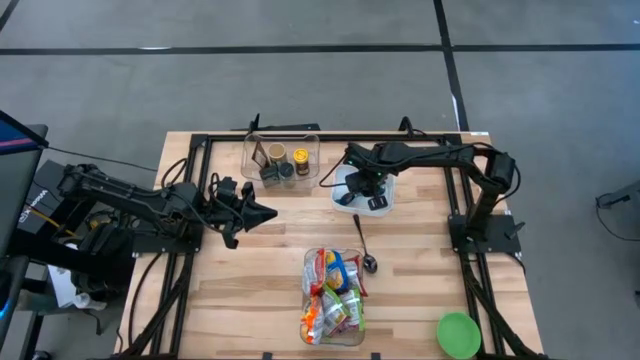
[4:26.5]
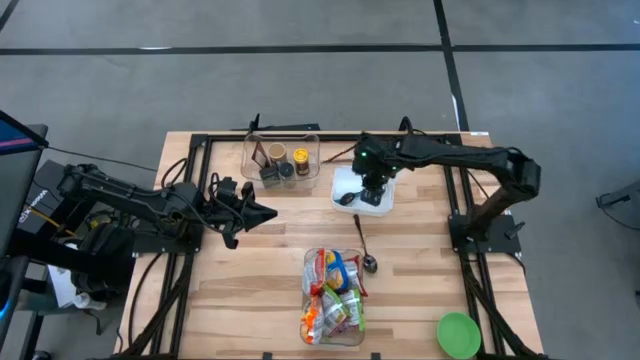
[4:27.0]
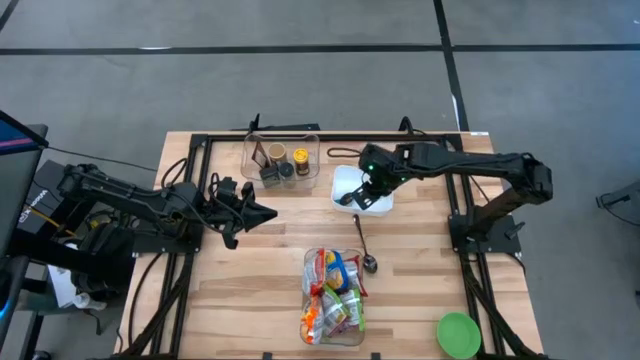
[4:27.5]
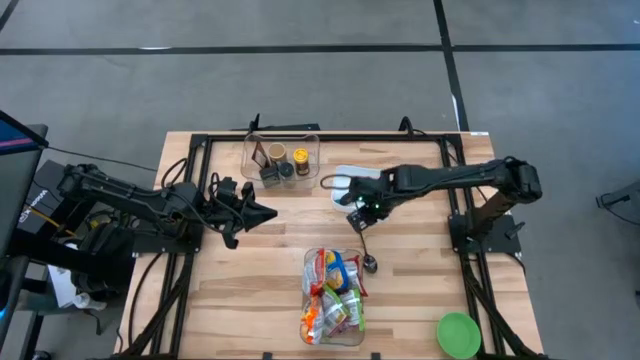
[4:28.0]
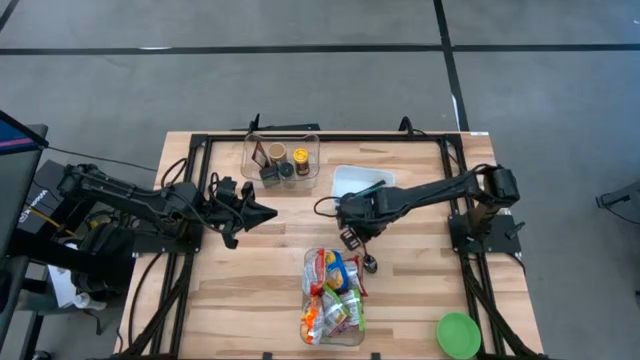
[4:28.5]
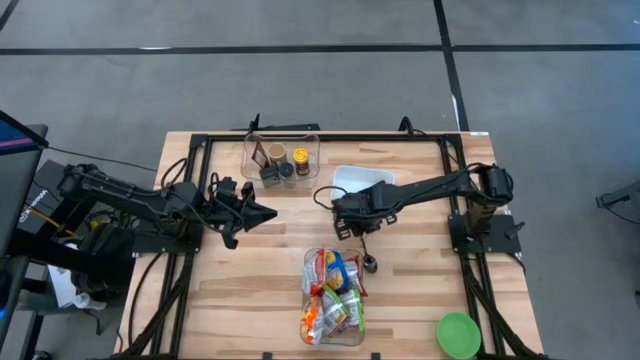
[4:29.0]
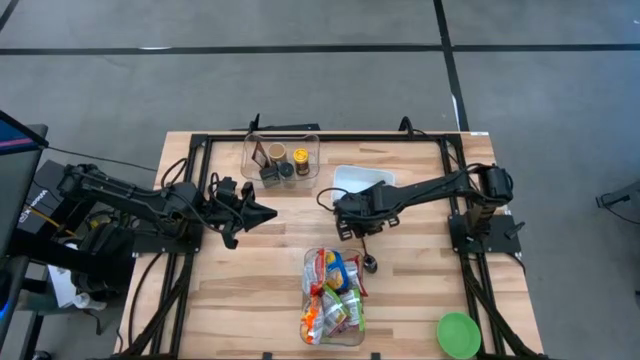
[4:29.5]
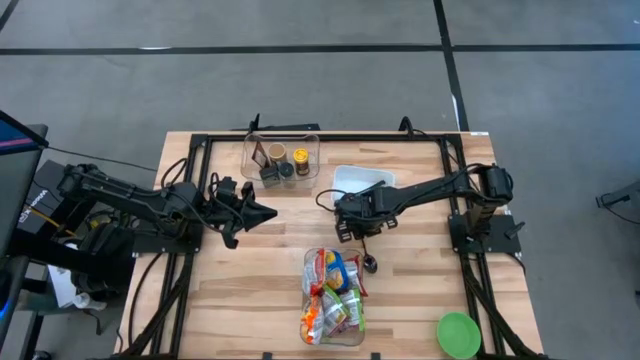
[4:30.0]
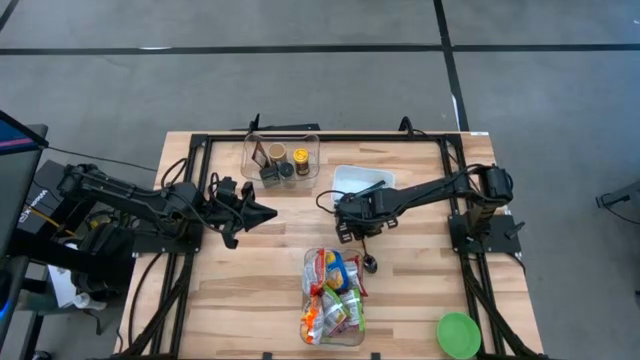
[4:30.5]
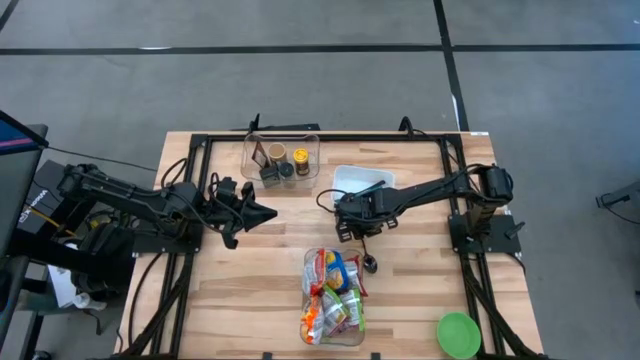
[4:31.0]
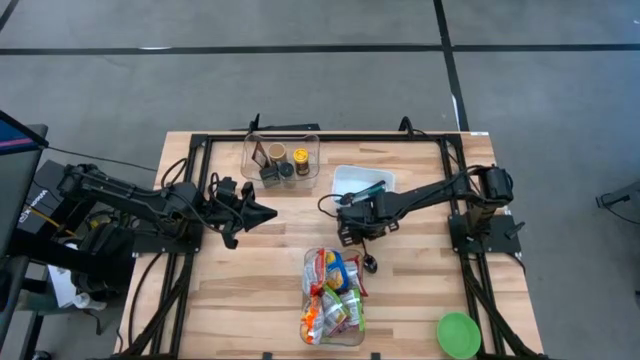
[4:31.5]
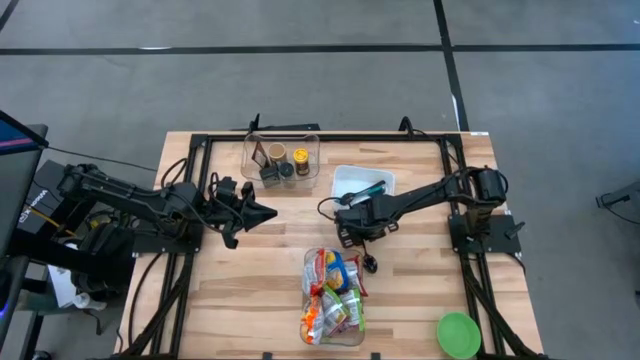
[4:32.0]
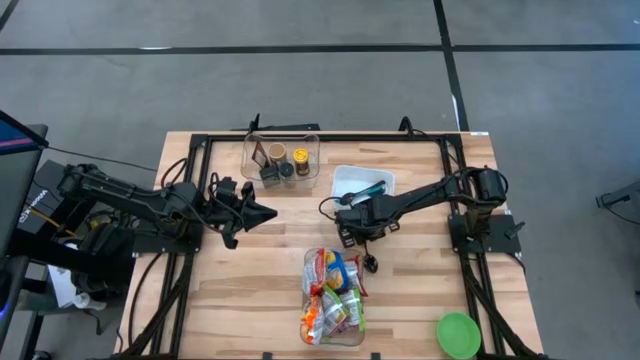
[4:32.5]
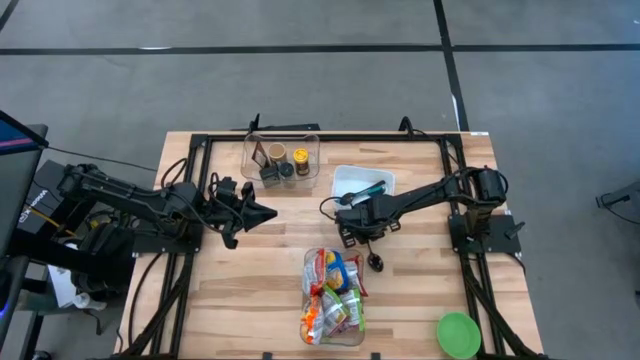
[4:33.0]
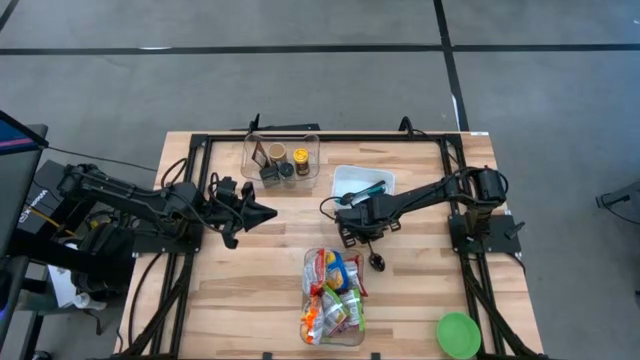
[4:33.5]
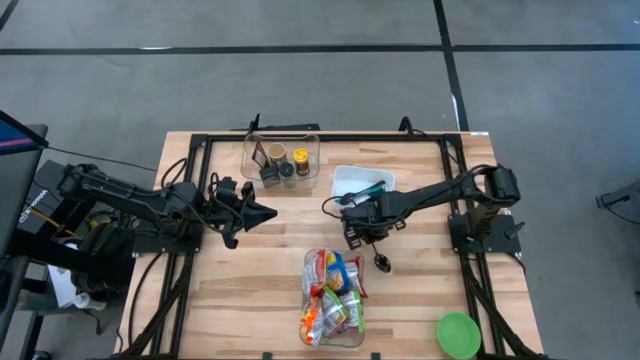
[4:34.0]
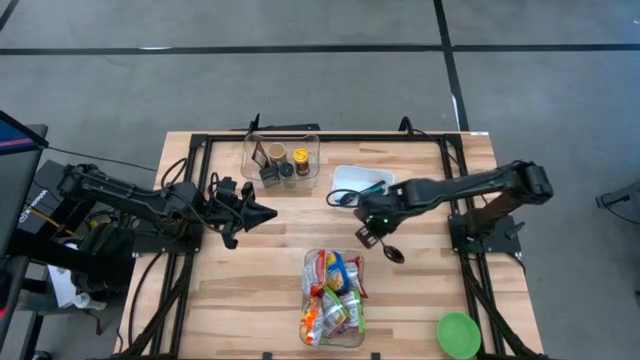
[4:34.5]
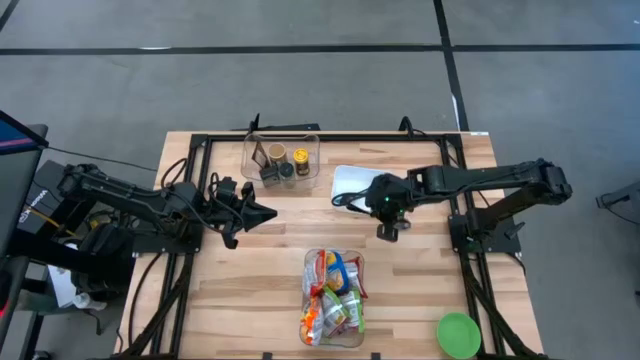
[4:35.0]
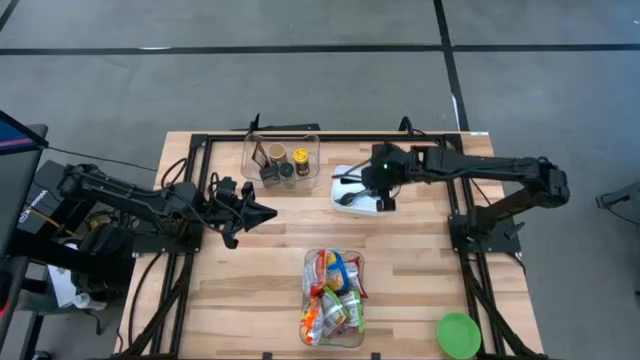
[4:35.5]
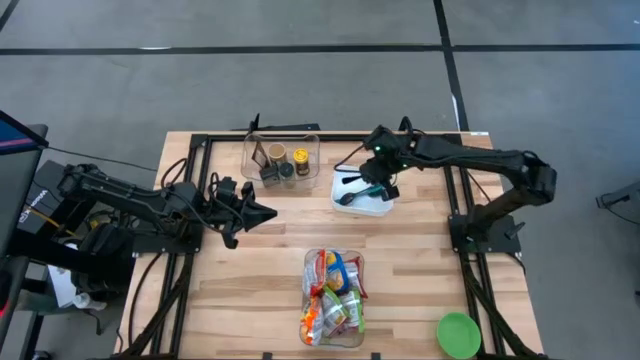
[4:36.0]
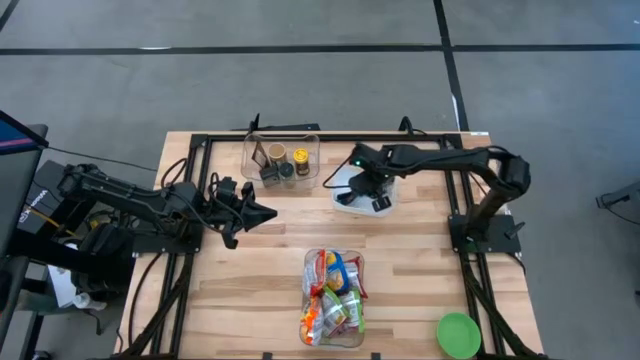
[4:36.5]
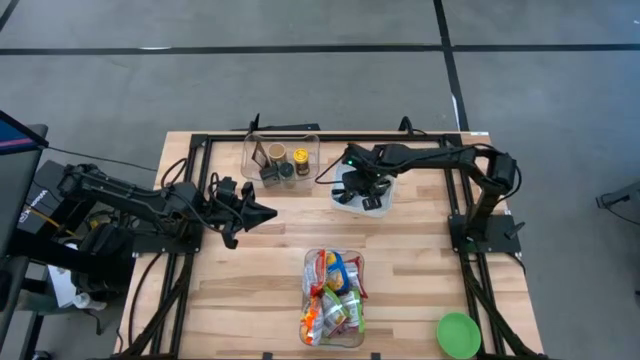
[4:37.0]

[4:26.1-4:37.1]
Task: Pick & Place Food Item
Put the black spoon into the white bin

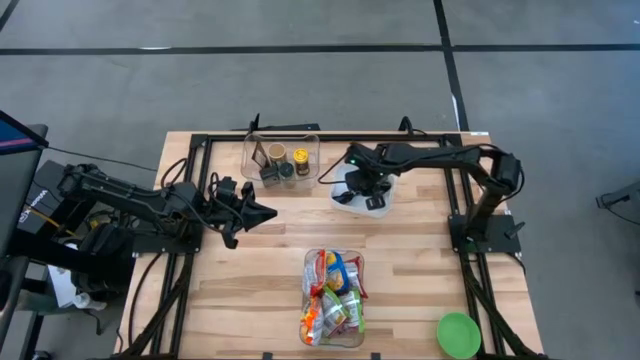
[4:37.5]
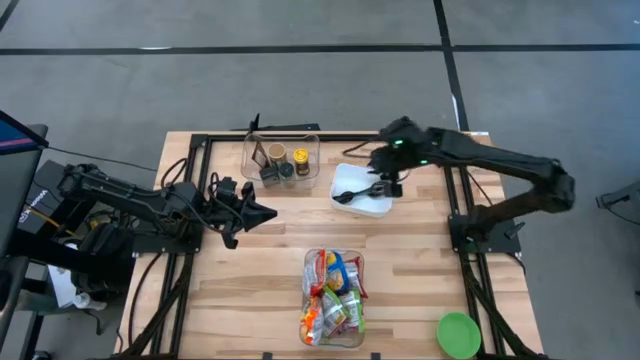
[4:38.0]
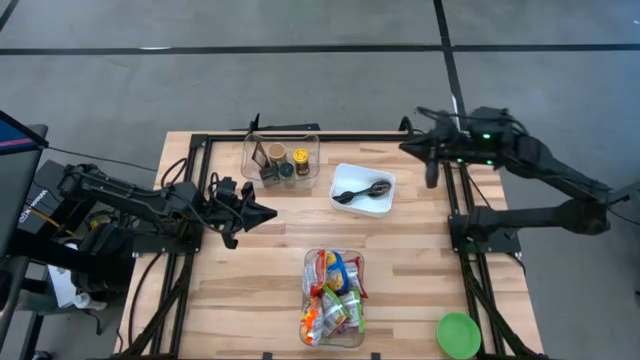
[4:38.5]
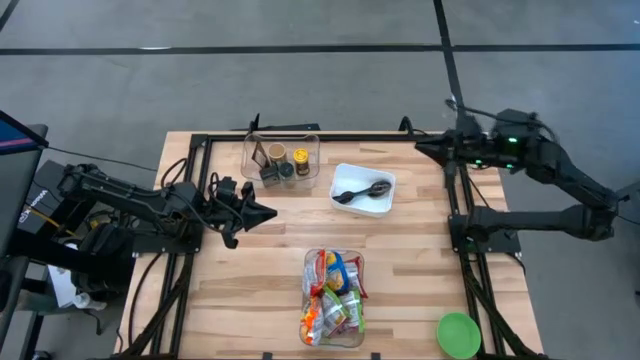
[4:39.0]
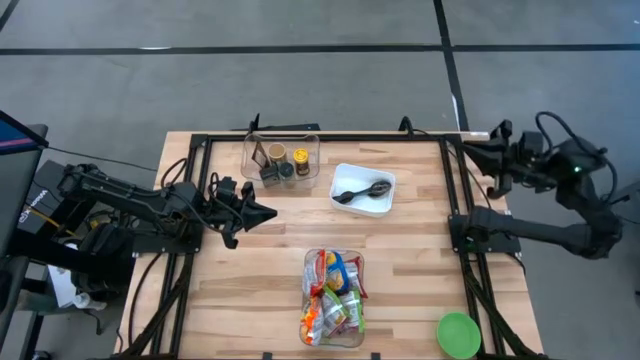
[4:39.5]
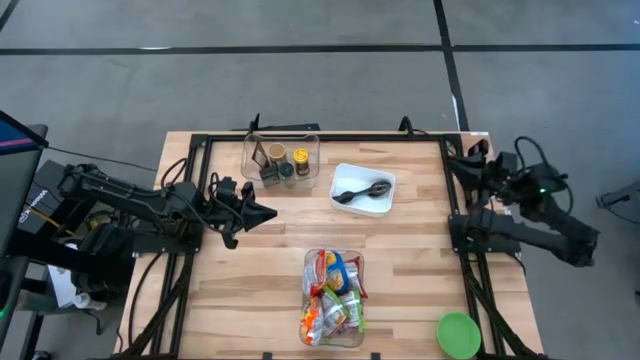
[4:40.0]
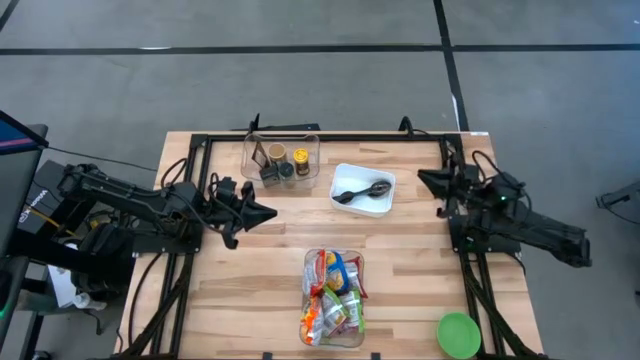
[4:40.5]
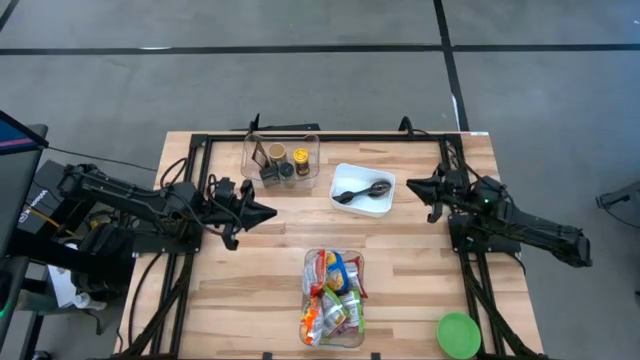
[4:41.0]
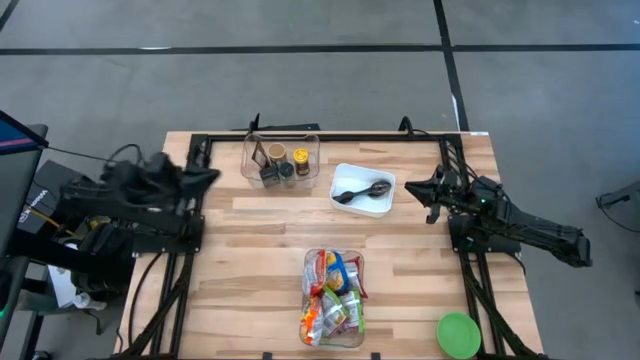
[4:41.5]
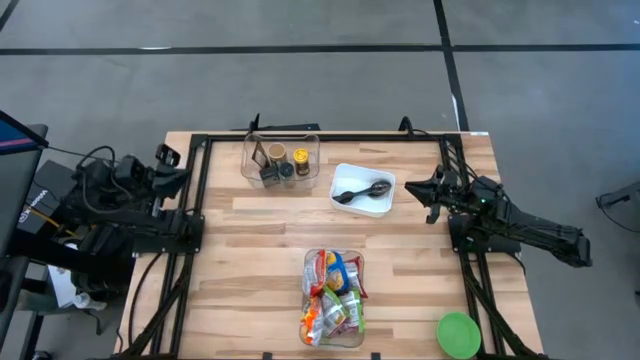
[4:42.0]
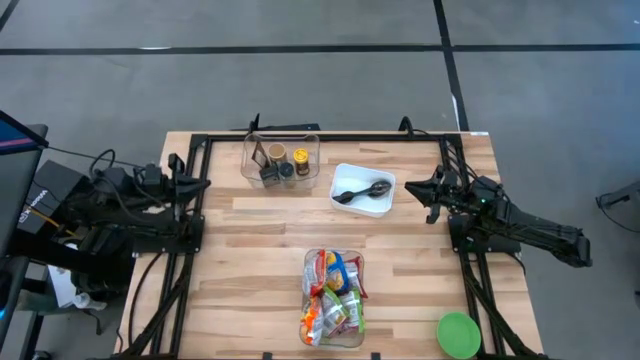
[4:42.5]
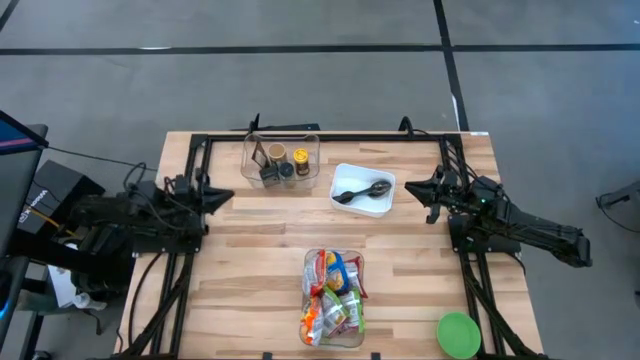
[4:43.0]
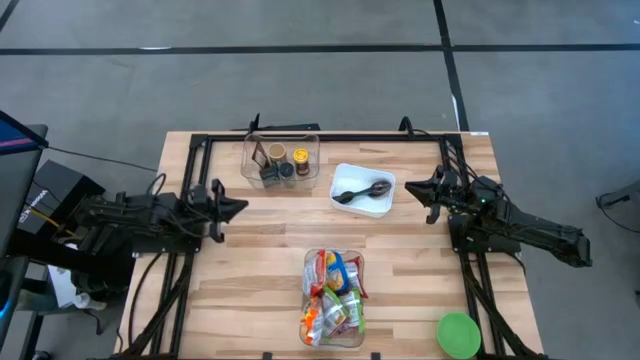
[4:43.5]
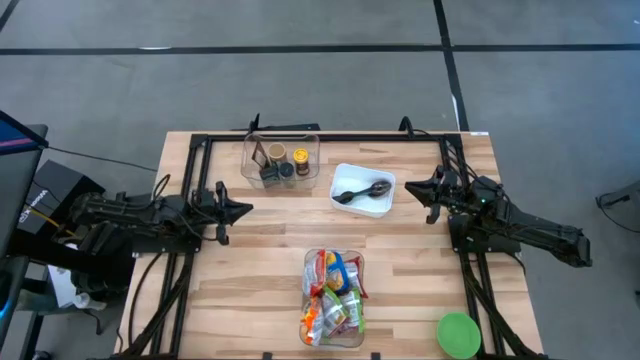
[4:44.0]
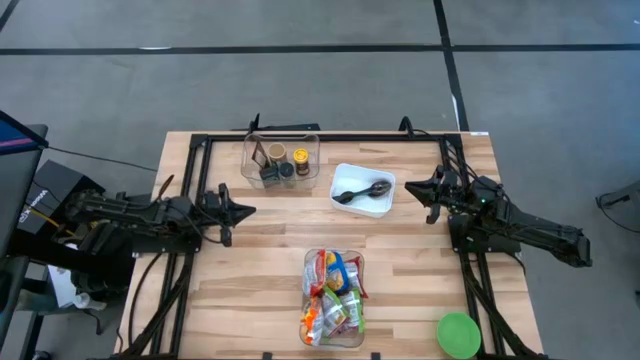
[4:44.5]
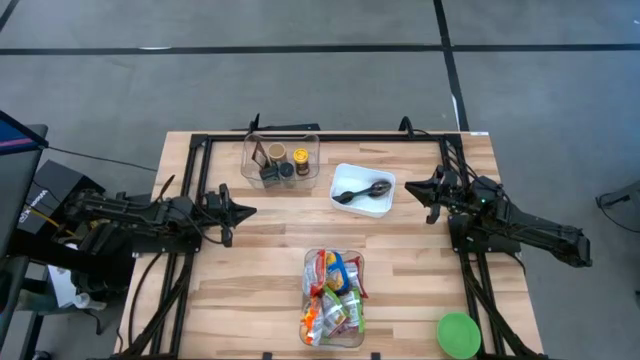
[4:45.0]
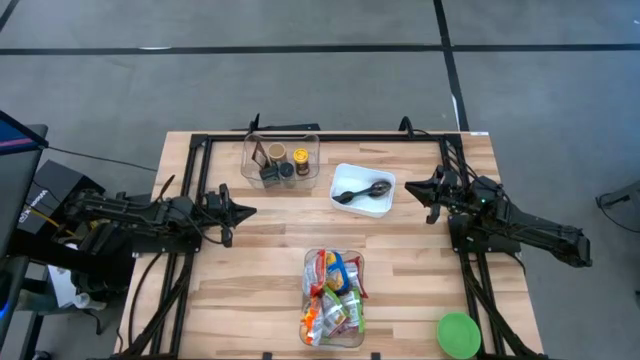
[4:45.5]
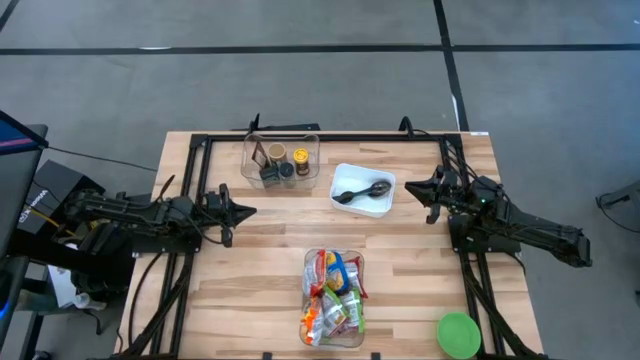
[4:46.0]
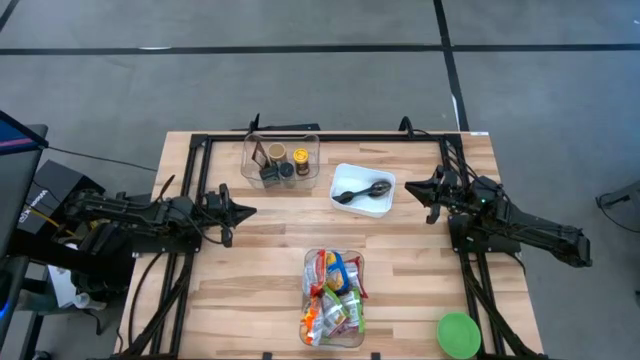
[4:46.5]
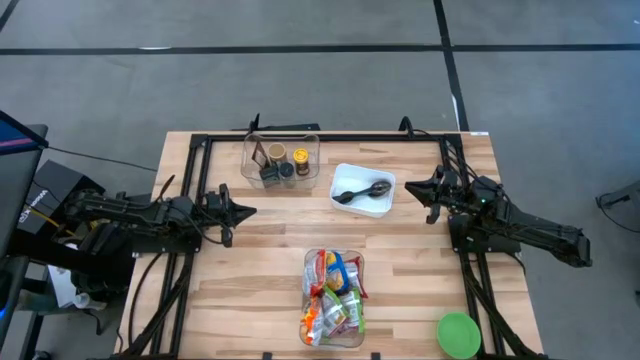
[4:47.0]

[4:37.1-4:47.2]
Return to Home Position

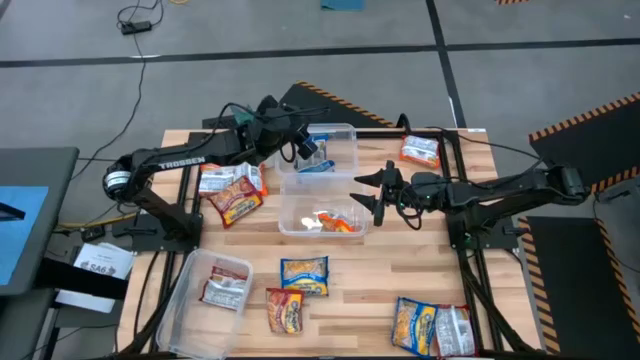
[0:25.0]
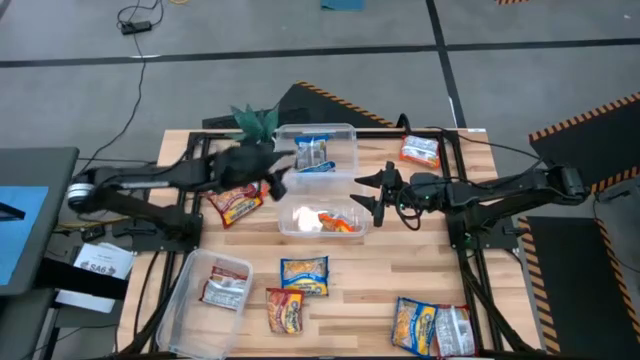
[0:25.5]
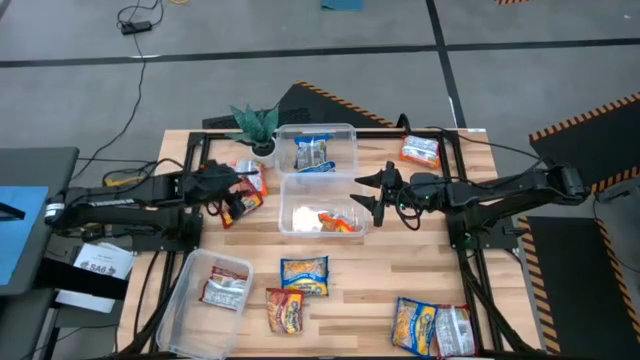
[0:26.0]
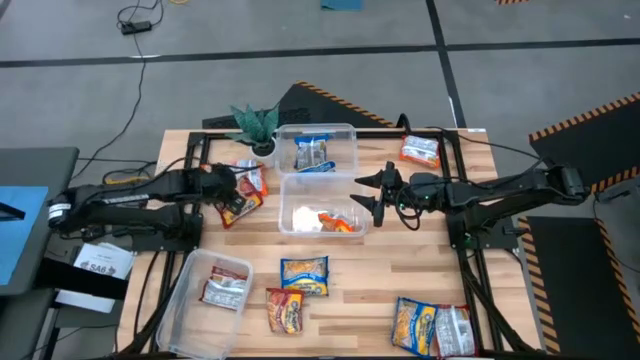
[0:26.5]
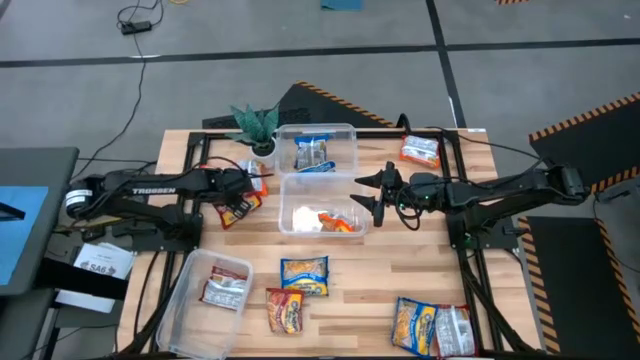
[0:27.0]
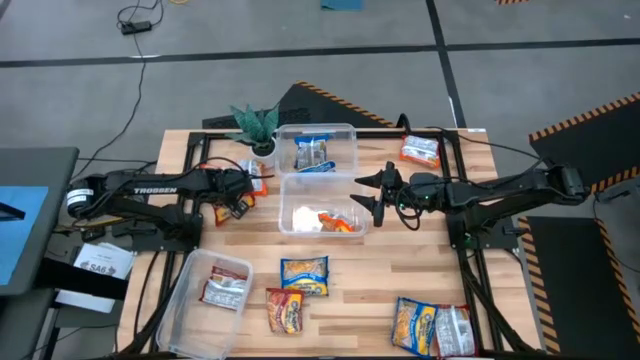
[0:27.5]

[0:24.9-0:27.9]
Task: Sort Maruchan noodles
Put the red noodle pack into the bottom transparent bin
